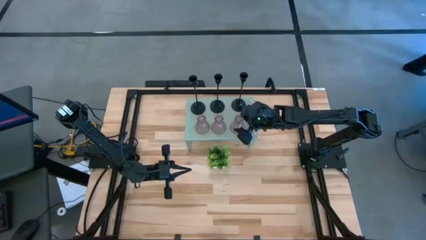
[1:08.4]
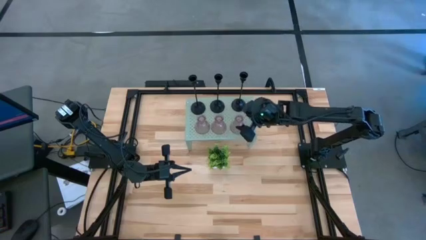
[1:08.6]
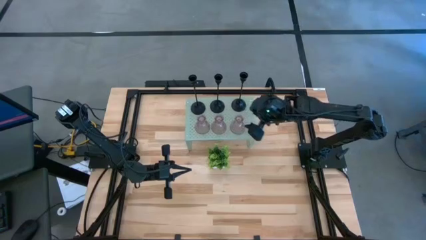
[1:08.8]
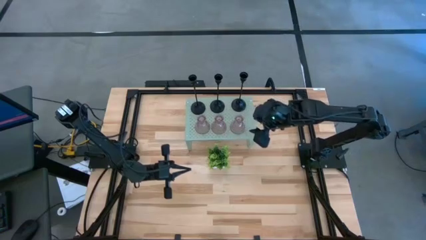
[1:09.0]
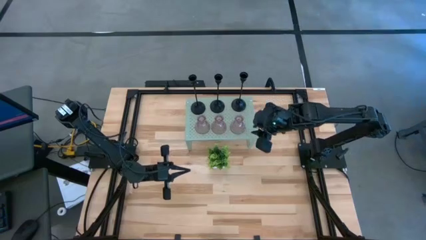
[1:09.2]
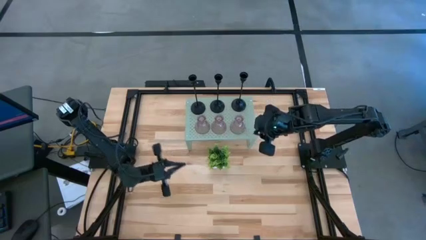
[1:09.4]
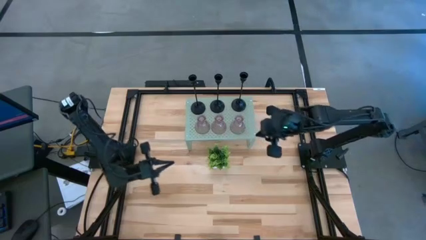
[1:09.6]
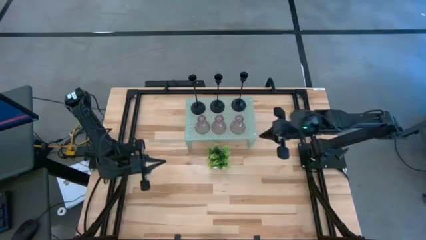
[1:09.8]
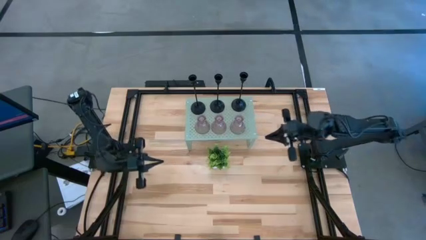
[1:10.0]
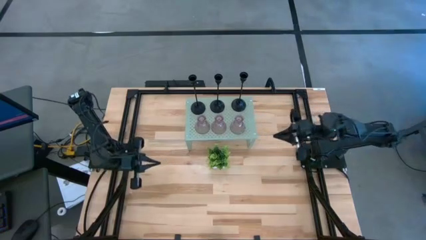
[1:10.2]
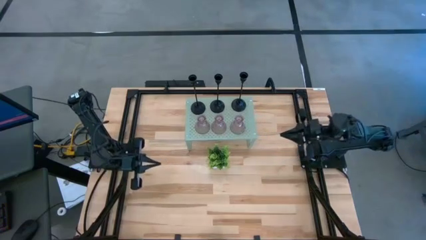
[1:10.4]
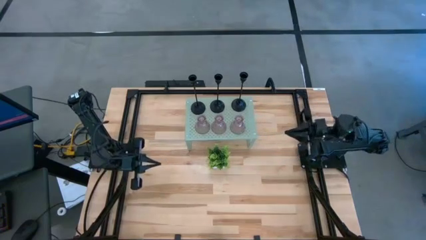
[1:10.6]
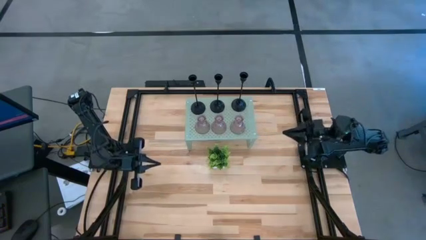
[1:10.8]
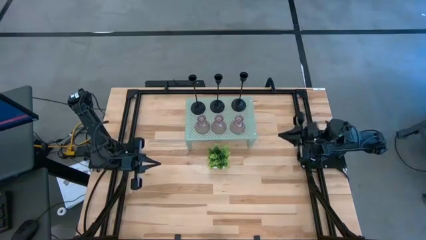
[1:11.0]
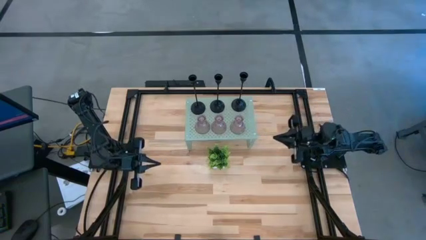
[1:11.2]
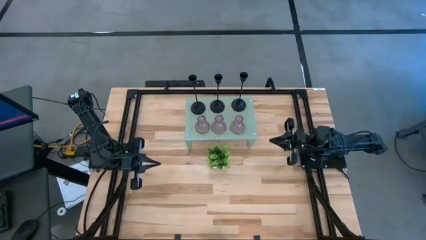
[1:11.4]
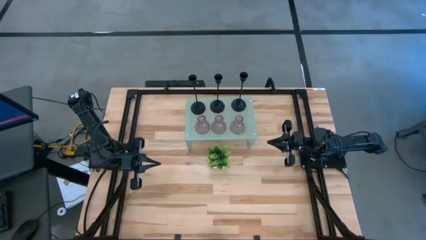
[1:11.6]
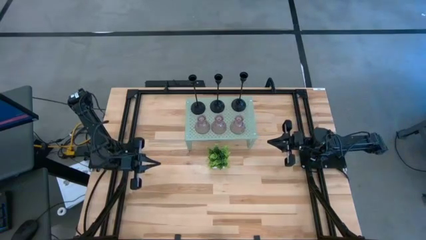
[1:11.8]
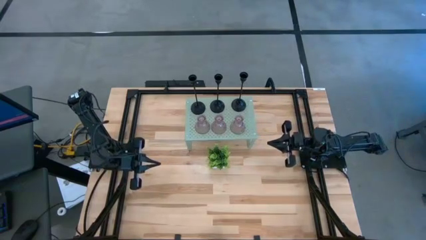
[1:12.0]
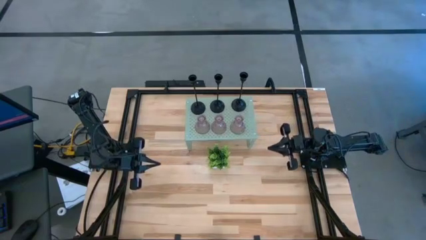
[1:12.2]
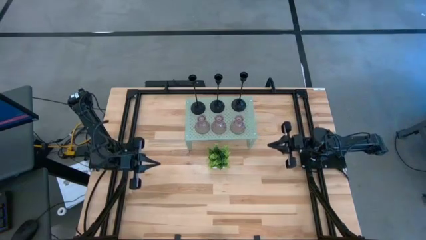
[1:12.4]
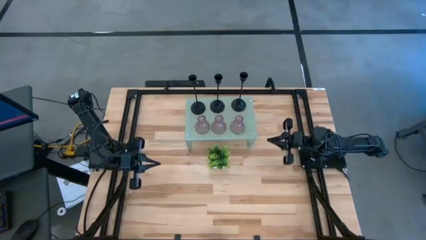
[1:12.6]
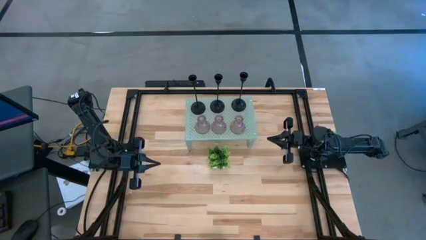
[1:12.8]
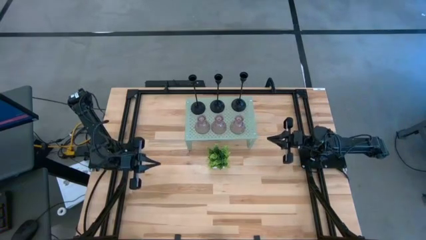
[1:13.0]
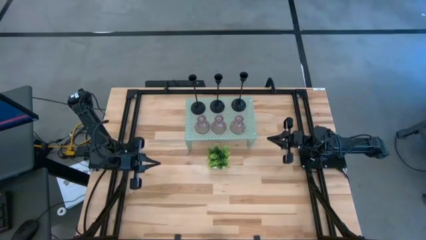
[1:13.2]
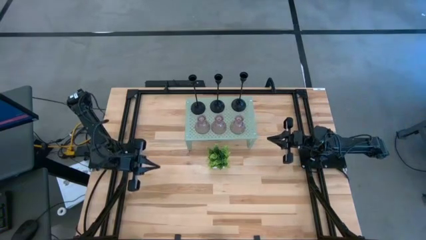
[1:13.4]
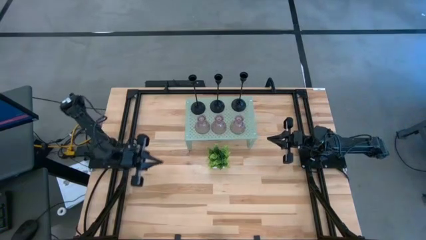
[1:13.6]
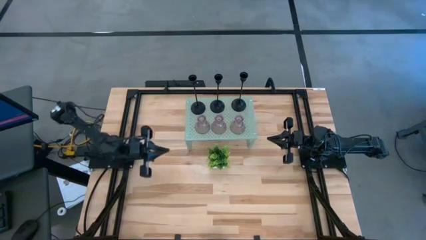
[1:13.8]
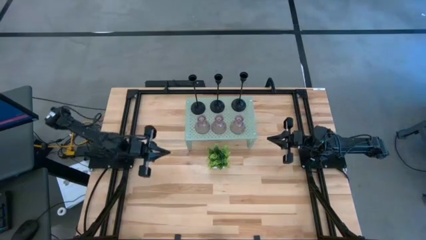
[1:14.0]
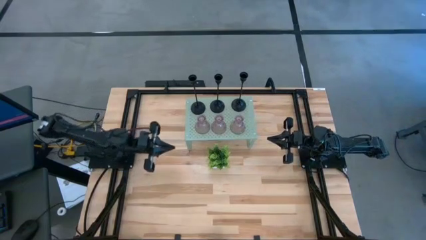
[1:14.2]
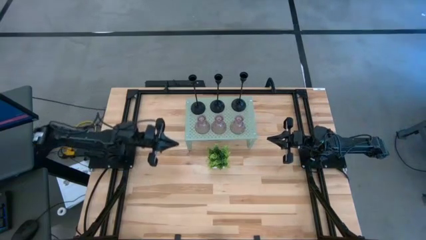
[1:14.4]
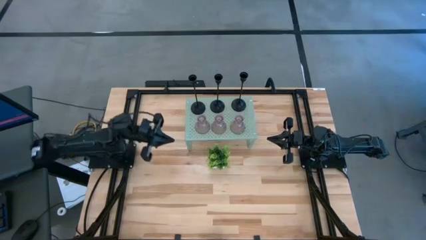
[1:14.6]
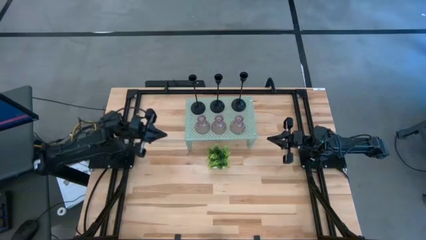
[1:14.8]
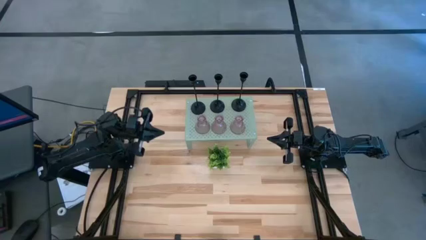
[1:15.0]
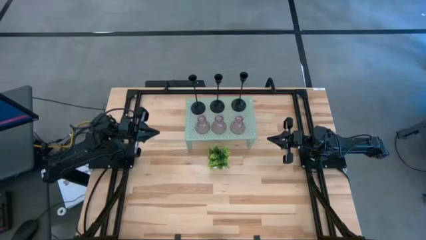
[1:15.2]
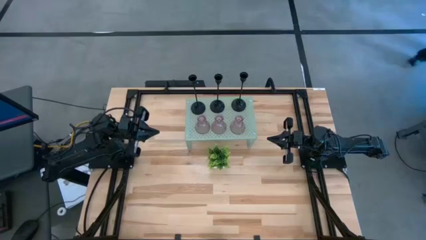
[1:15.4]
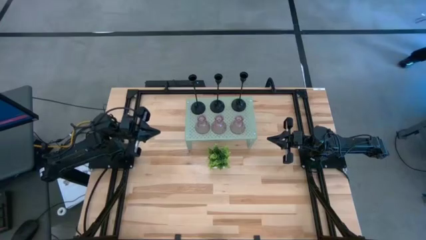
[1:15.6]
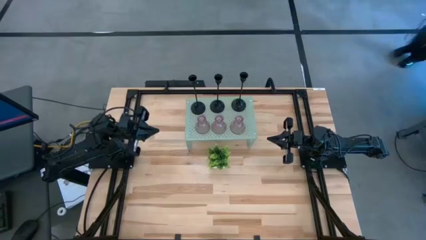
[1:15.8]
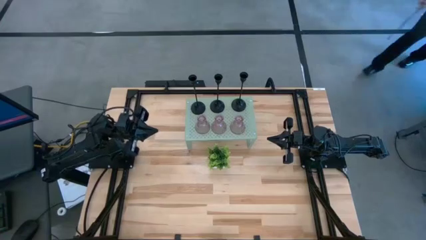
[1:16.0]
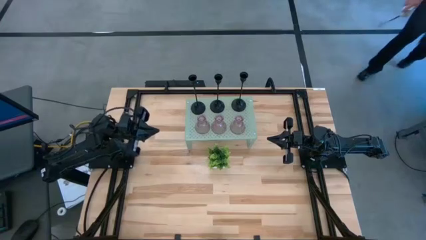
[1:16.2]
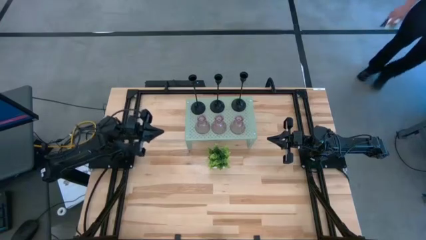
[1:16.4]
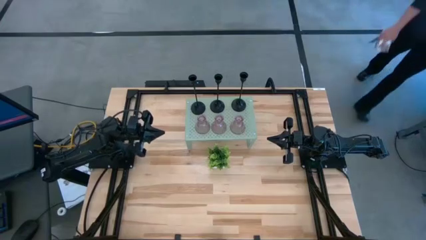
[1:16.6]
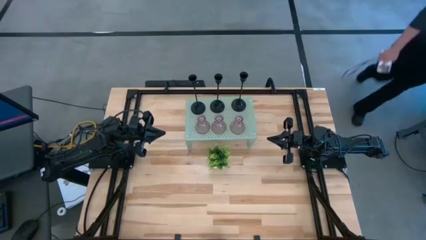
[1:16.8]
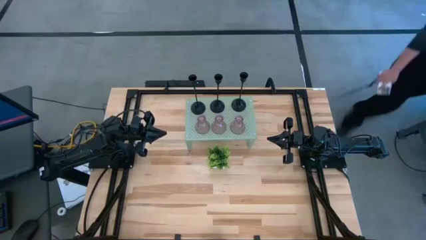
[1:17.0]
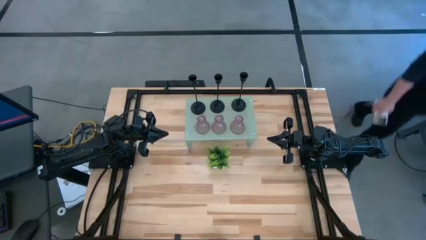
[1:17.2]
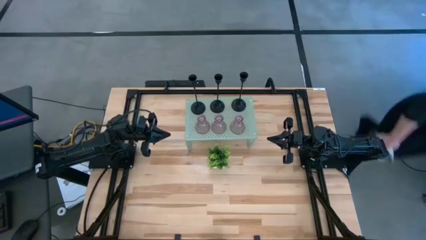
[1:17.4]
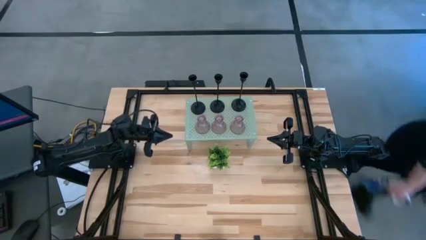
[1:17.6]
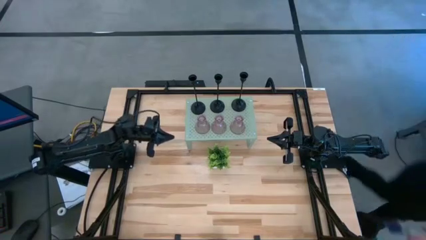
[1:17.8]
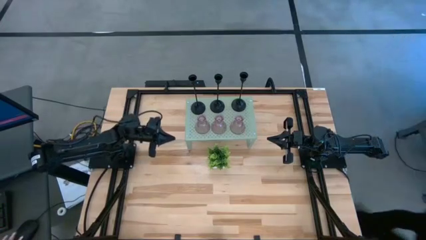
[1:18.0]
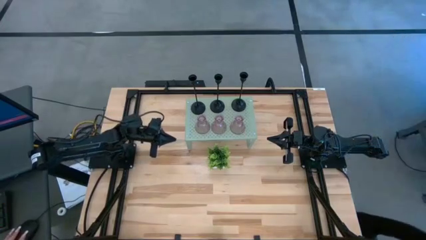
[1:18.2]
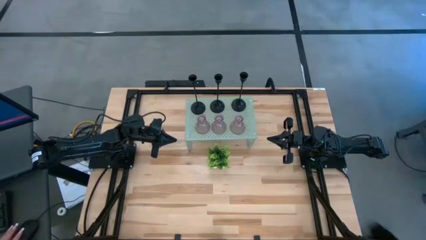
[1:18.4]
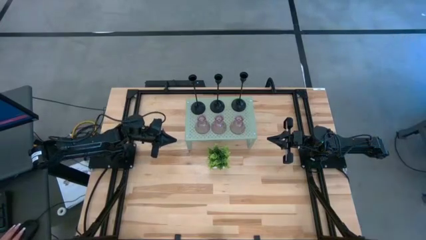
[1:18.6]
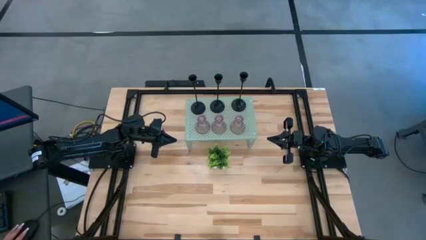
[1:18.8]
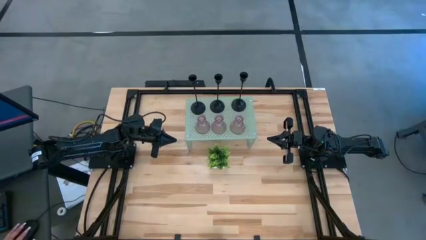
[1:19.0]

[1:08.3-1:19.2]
Task: Pick & Place candle stick holders
Return to Home Position

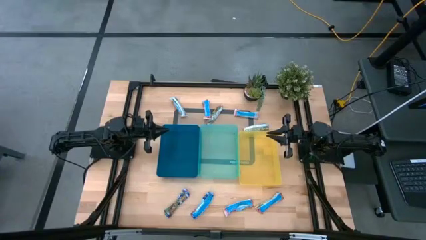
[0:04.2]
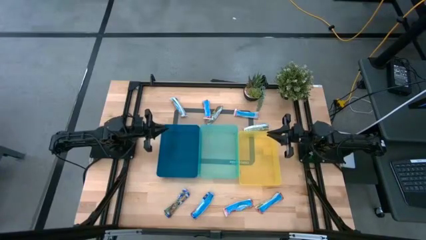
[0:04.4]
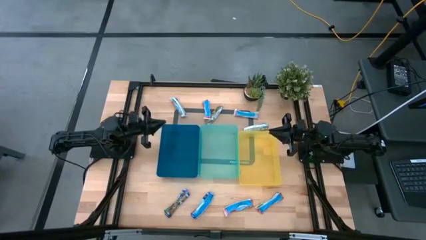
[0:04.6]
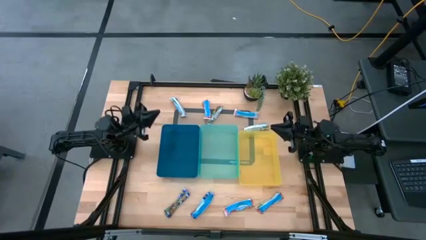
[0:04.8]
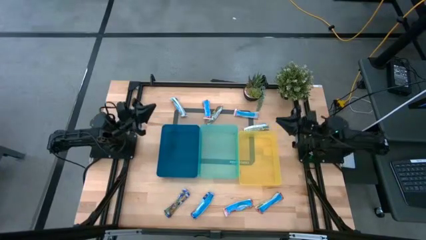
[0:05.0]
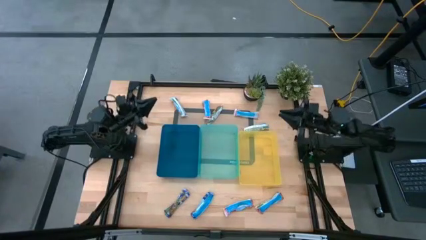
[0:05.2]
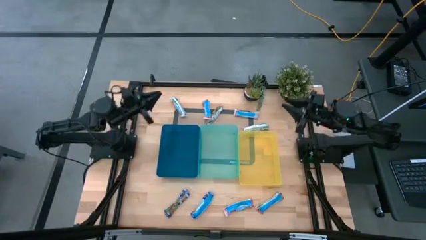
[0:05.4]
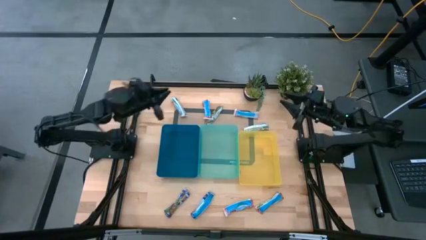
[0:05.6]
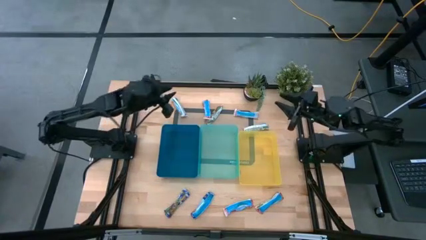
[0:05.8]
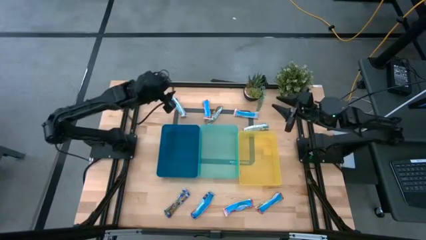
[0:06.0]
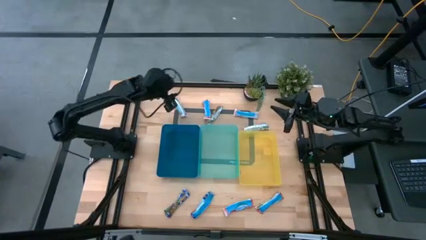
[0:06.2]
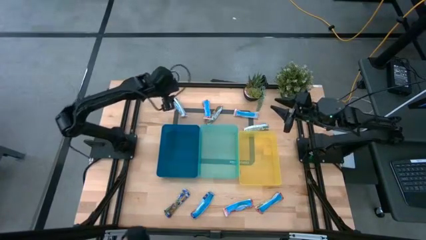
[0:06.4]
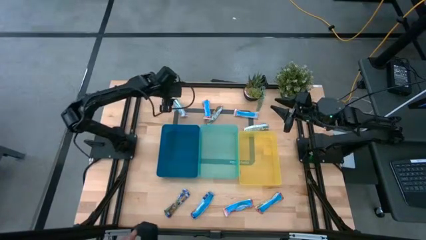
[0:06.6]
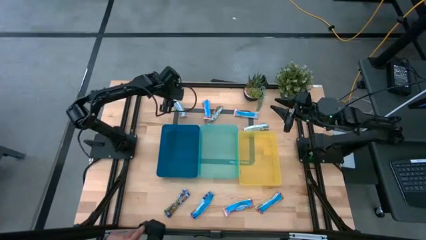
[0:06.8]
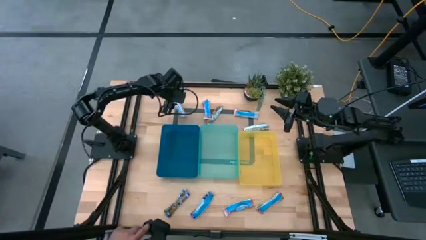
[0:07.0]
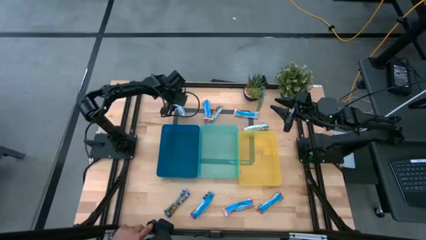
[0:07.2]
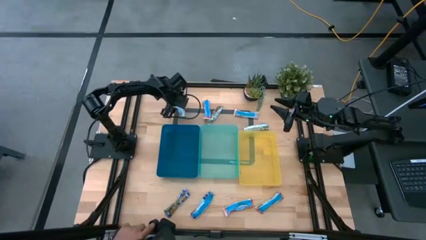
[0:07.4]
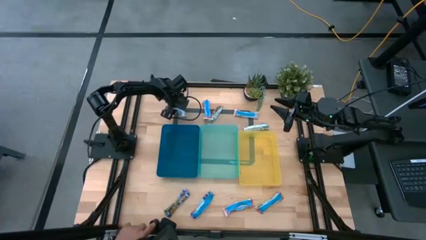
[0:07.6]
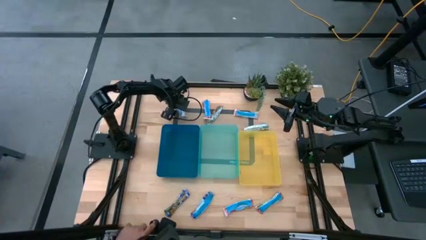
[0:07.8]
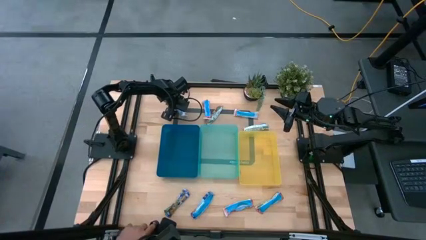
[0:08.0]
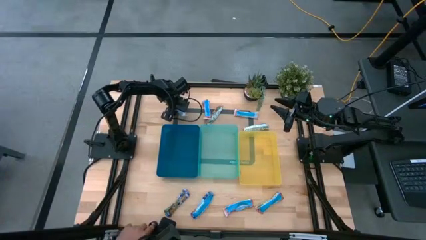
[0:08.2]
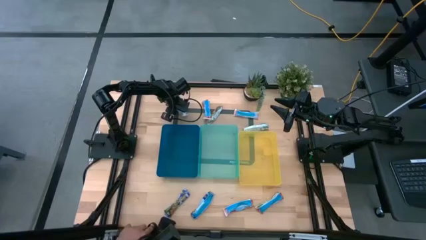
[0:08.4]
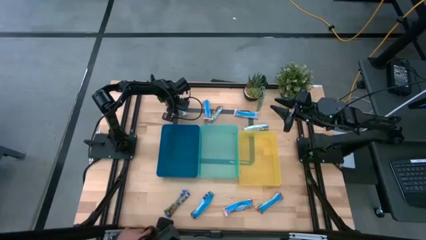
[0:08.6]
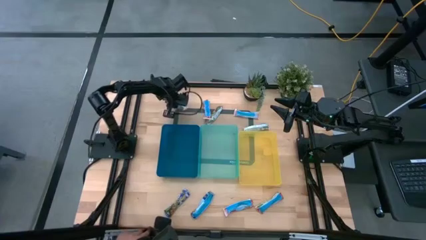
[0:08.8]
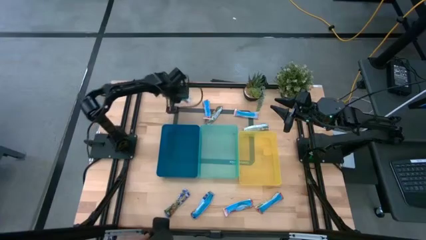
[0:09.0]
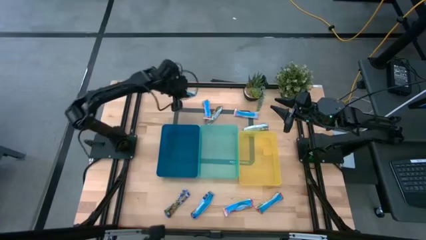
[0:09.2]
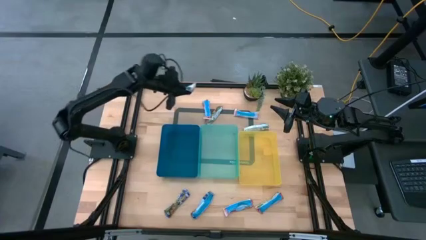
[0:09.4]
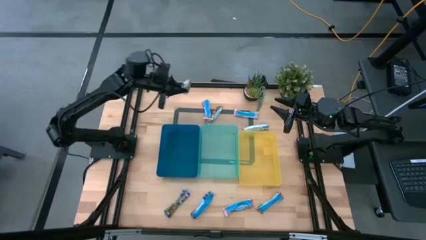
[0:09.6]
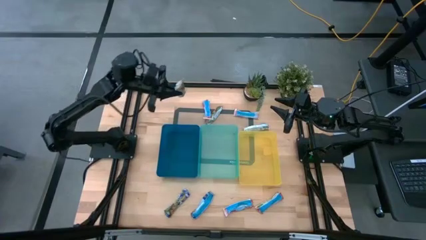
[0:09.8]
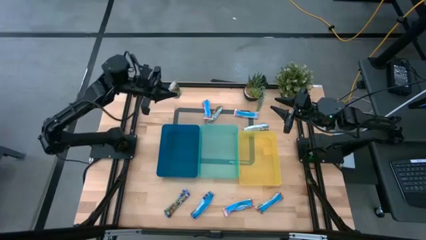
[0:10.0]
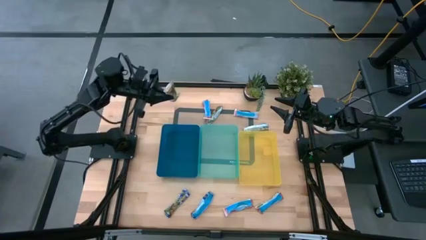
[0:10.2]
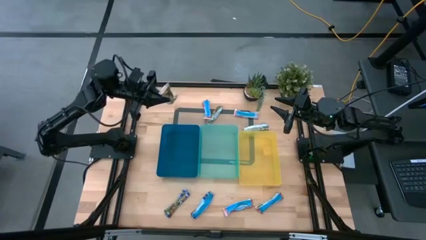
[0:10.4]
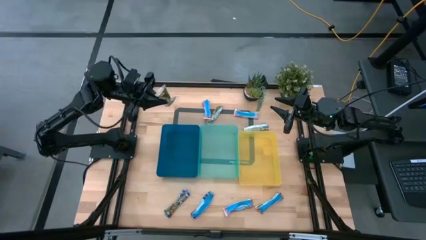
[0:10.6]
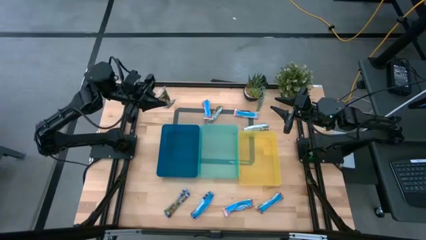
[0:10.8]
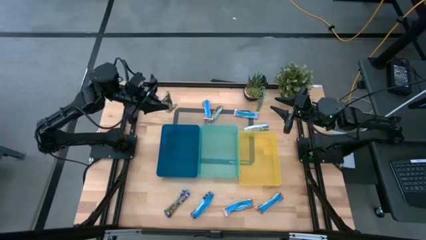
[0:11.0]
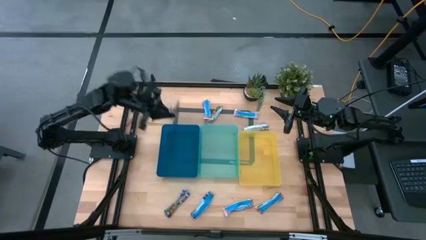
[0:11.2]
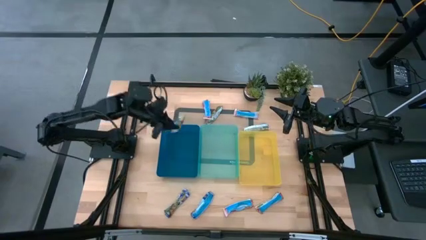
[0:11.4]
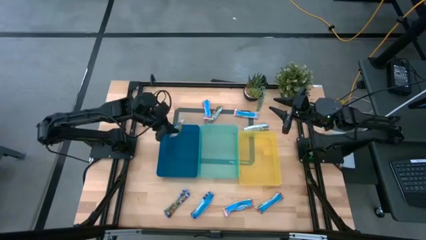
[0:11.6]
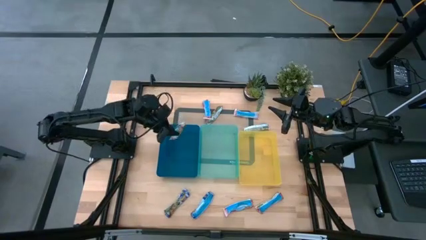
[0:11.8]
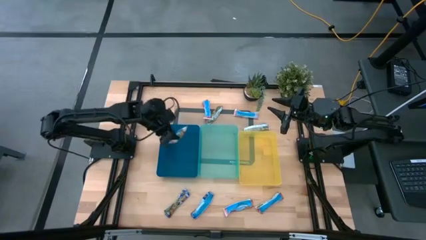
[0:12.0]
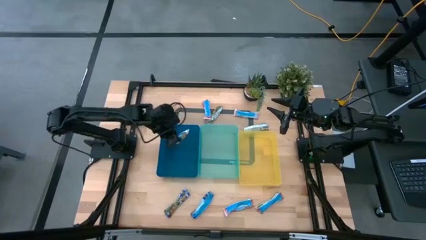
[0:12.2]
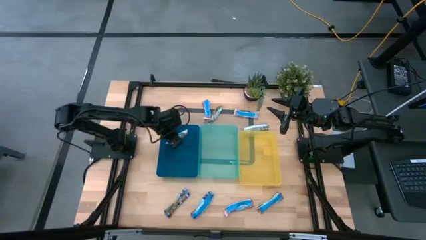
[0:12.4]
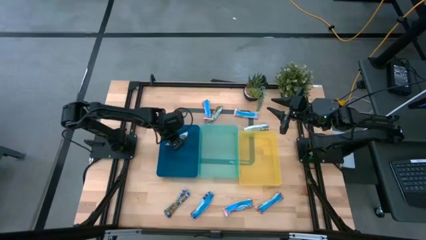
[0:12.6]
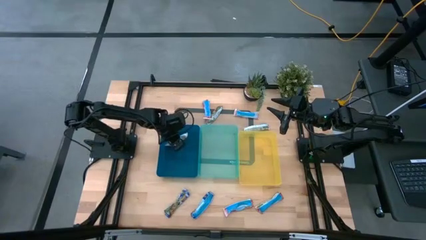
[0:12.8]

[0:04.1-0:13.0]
Task: Pick and place Granola Bars by type
Put the left yellow granola bar into the blue bin
